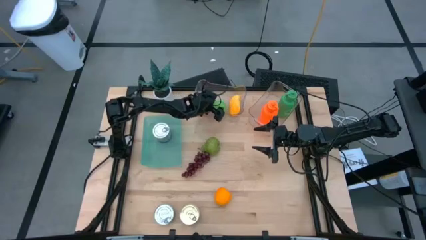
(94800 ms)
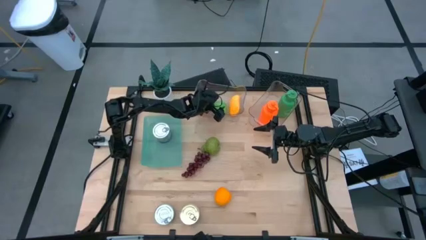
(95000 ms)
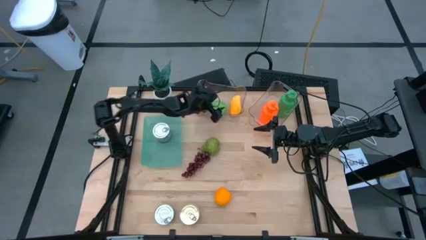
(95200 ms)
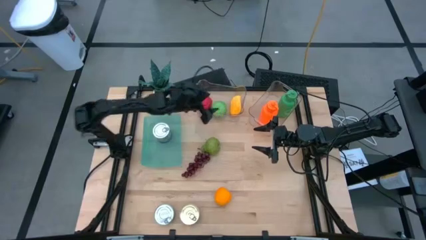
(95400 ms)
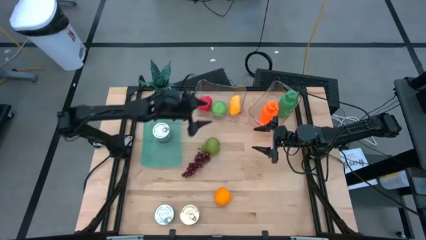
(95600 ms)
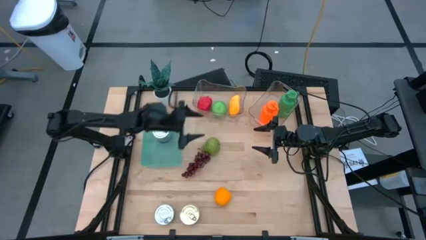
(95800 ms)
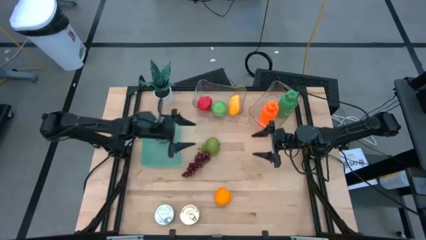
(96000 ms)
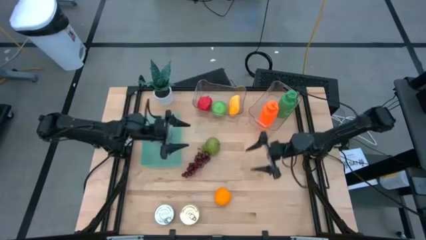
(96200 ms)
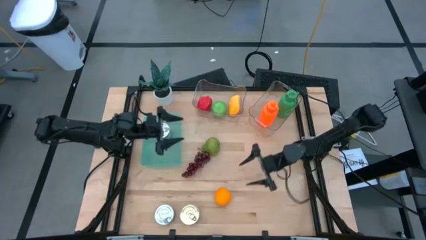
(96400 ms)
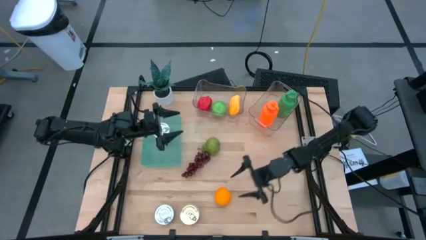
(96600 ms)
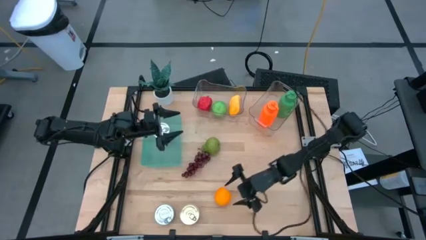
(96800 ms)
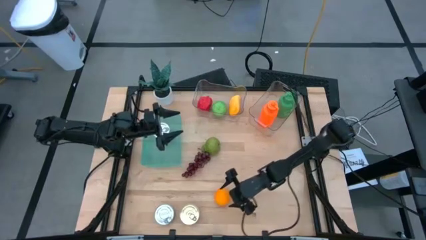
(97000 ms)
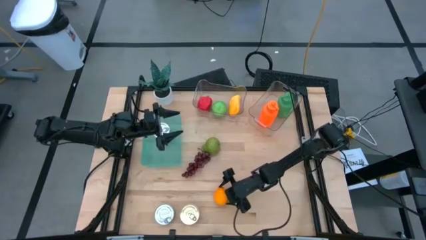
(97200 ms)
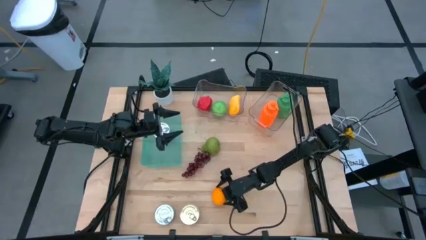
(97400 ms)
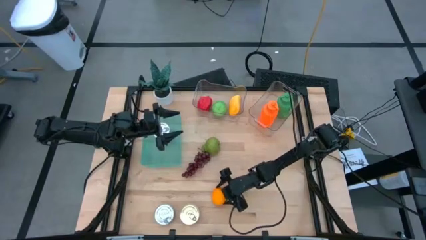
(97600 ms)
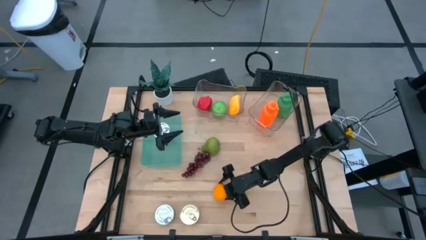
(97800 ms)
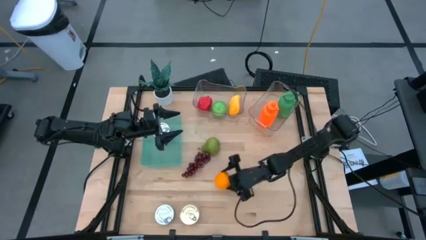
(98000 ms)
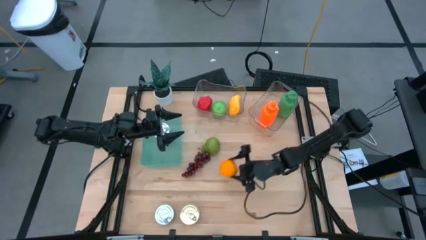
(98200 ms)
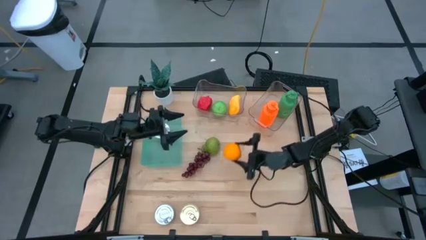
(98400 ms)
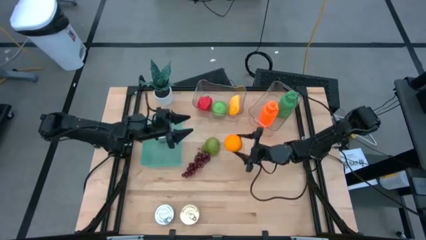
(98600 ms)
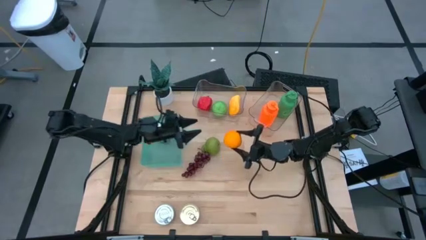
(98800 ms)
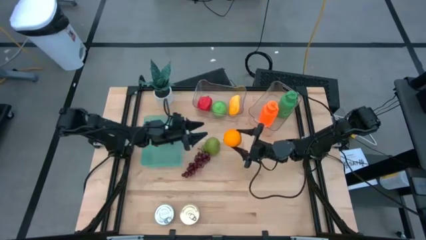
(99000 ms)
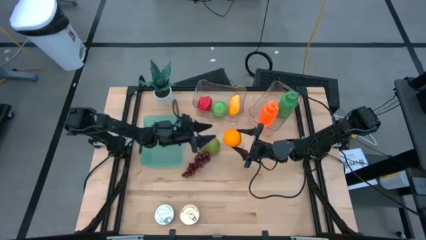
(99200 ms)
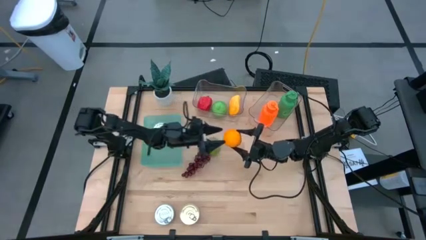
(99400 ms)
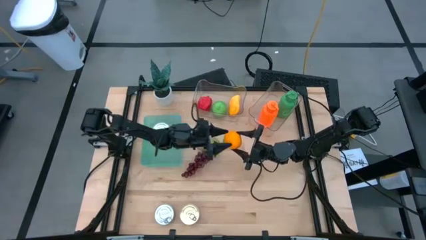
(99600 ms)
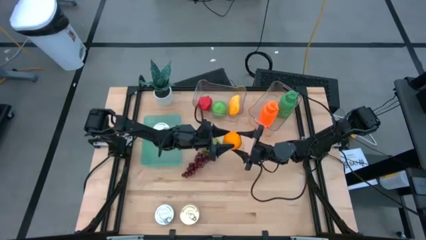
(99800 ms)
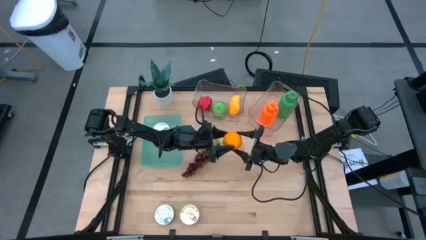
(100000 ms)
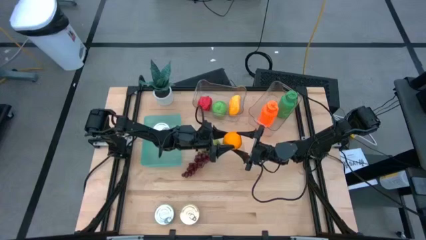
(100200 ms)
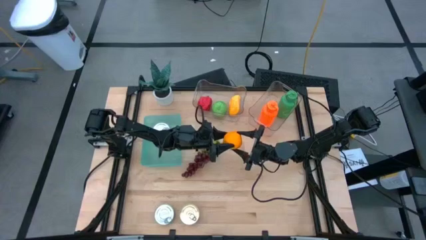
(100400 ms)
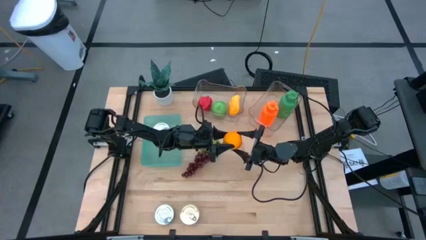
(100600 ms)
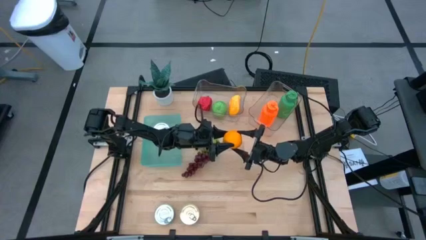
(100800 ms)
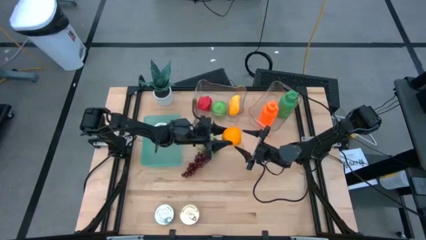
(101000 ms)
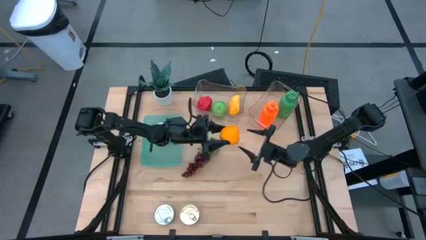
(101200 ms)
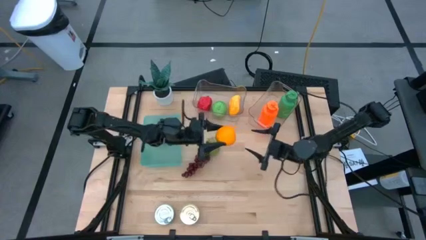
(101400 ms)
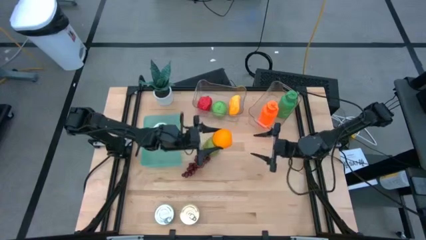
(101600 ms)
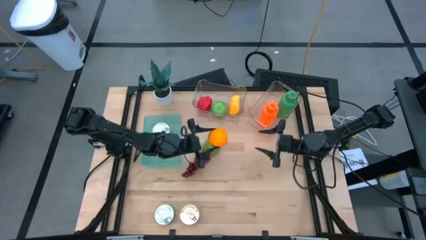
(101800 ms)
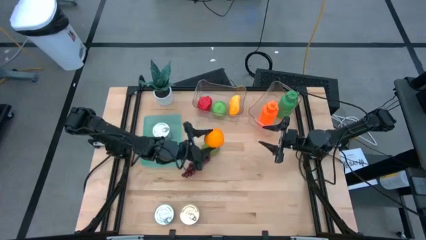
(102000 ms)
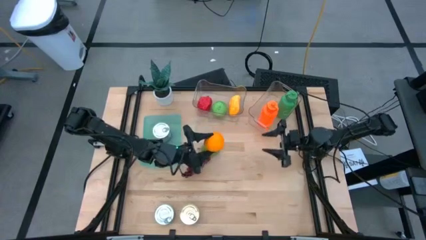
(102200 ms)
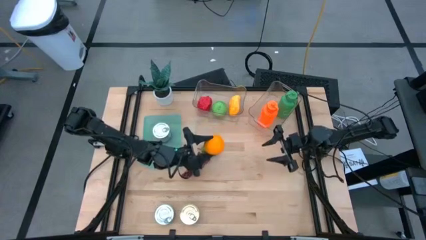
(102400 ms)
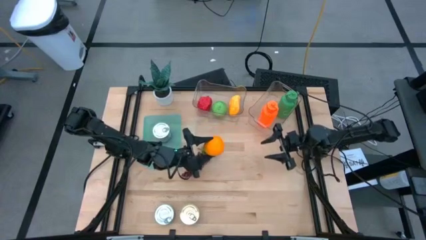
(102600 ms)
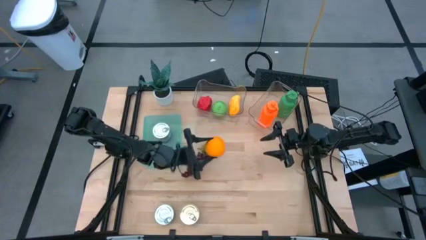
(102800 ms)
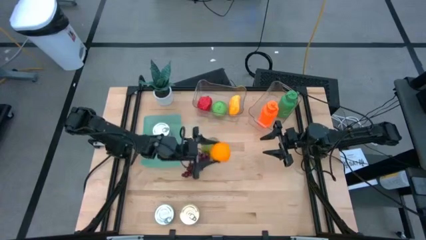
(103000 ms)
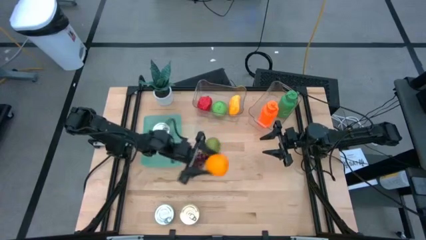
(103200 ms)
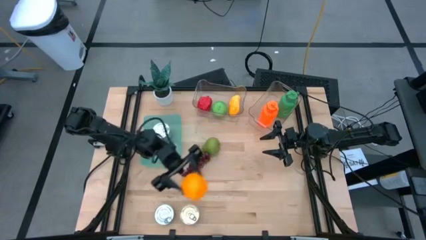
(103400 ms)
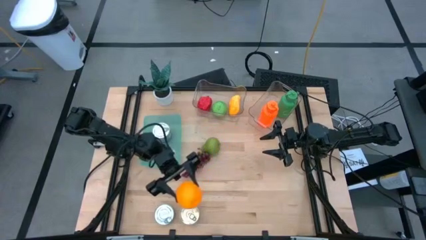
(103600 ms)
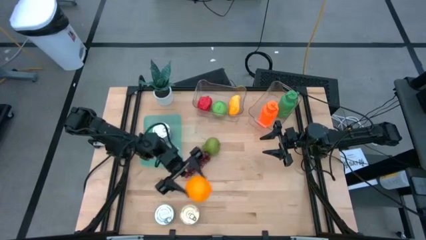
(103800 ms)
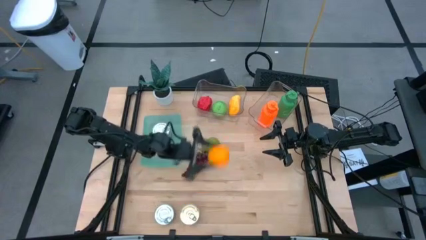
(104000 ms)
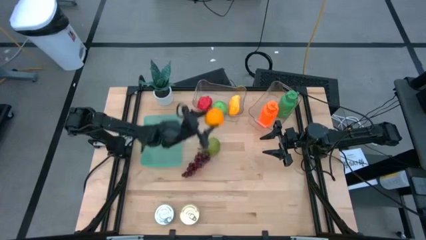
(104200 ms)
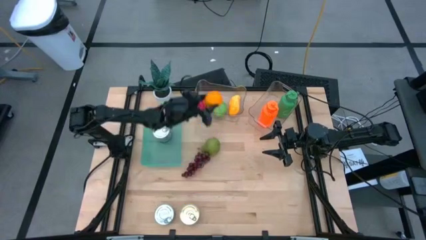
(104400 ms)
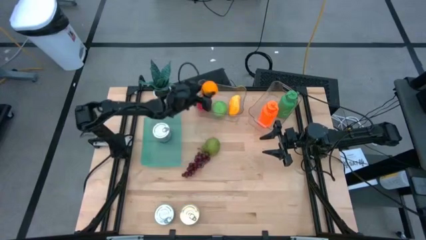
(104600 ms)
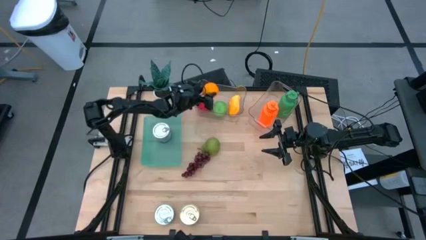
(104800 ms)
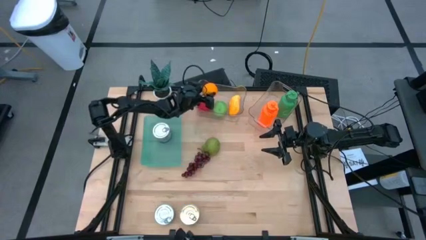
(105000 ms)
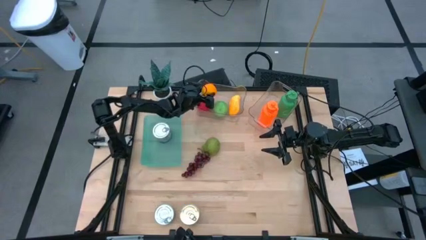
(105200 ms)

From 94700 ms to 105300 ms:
Task: Pick & Place Food Item
Put the orange into the left transparent bin

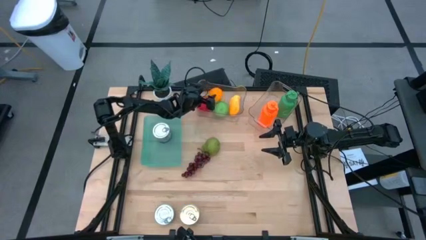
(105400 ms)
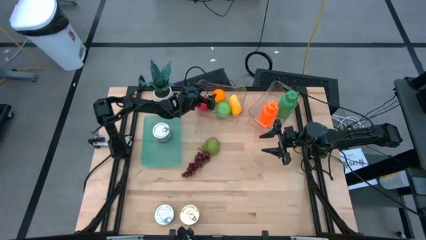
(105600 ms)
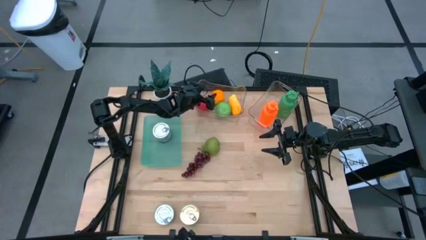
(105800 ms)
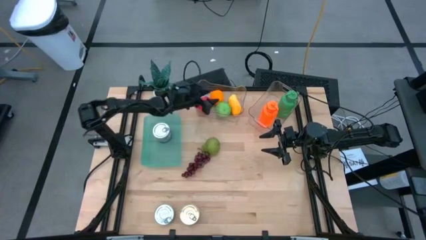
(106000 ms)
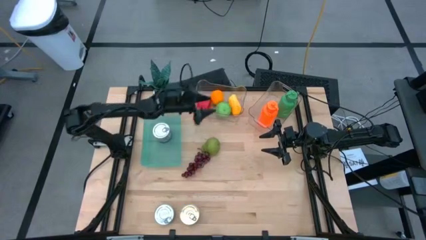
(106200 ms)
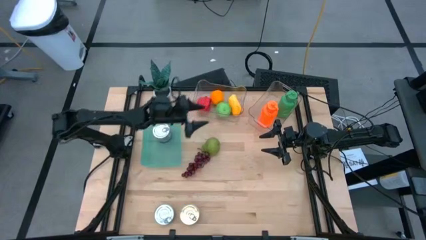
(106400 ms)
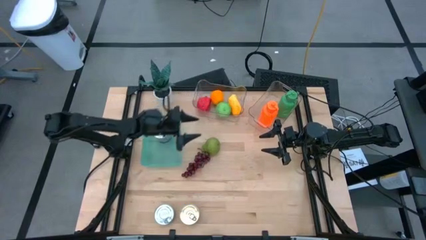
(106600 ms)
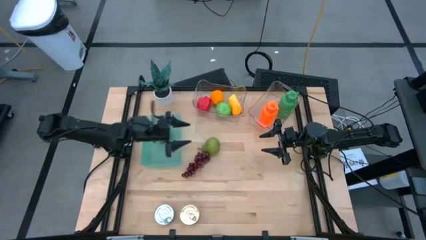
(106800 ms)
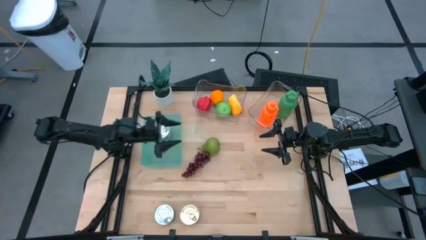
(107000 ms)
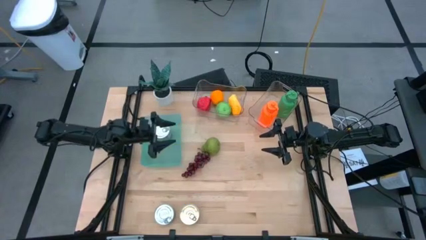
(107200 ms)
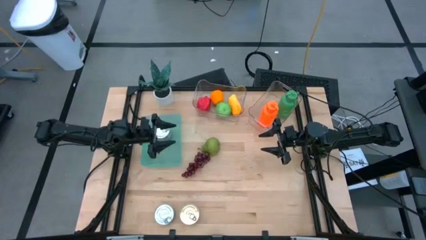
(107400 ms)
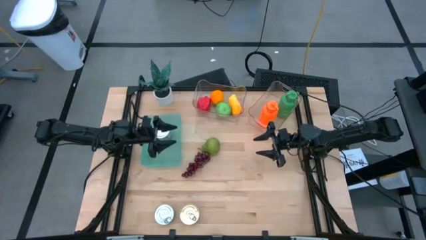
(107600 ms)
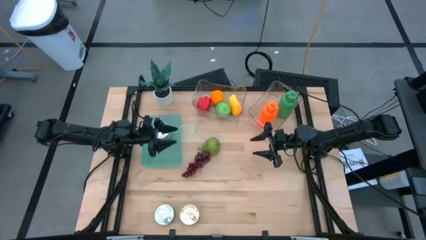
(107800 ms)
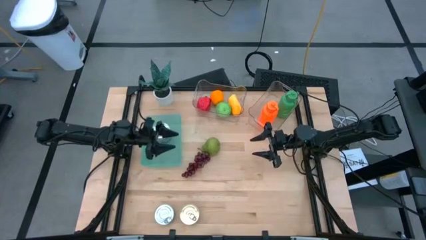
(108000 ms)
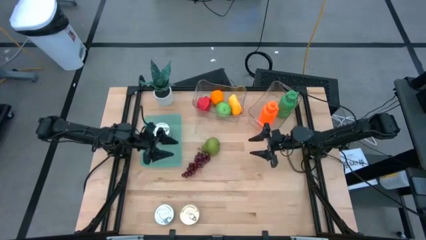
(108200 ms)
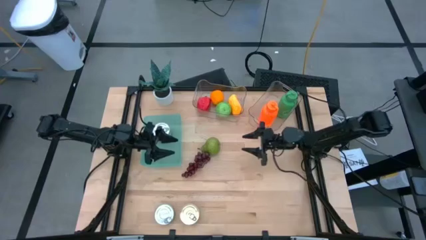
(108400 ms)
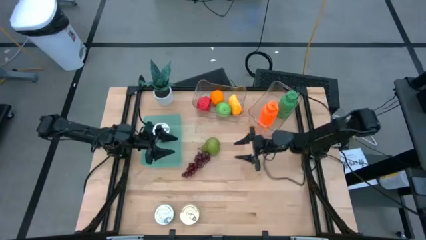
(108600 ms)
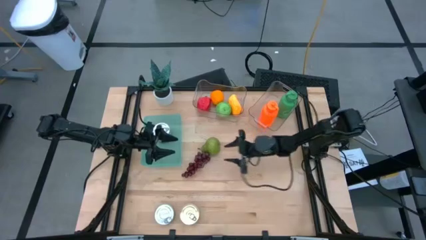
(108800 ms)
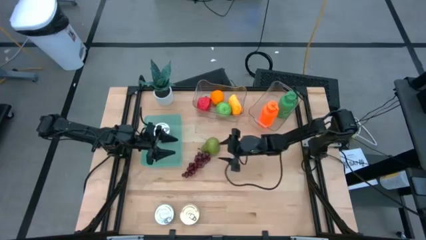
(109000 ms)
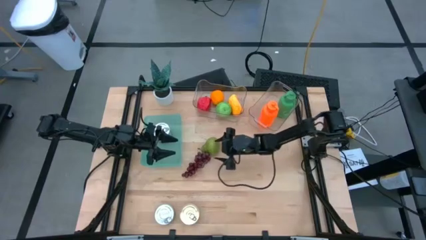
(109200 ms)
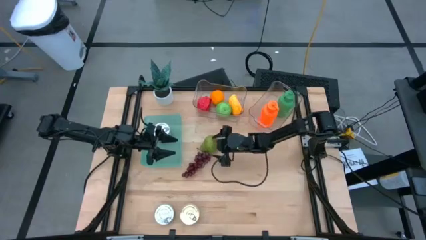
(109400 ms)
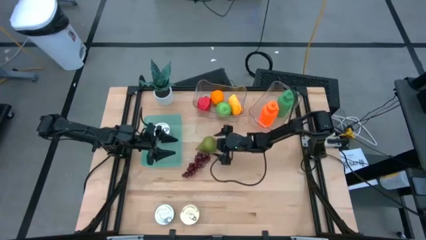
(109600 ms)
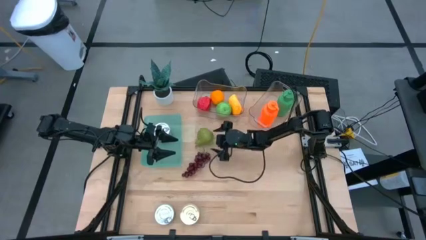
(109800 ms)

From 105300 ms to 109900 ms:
Put the green pear into the left transparent bin

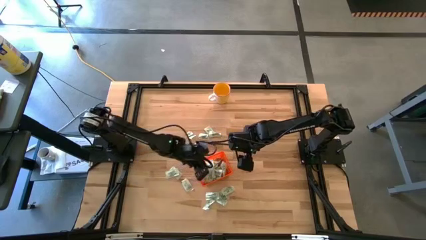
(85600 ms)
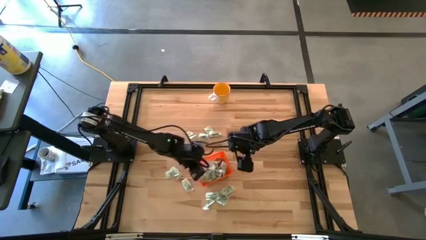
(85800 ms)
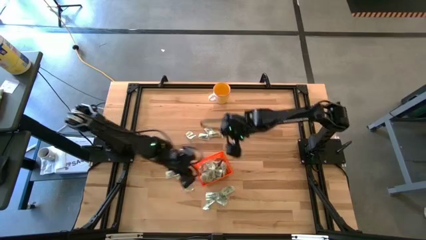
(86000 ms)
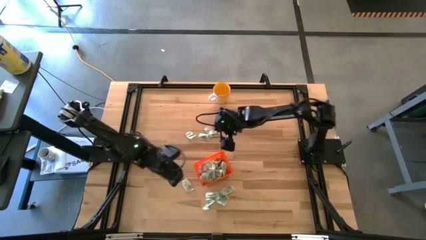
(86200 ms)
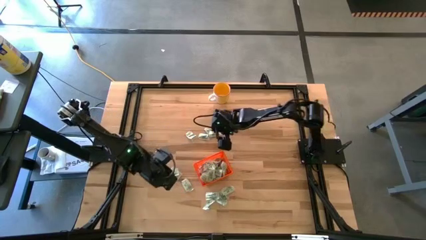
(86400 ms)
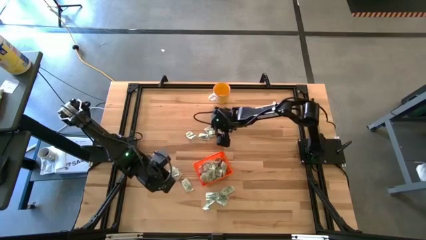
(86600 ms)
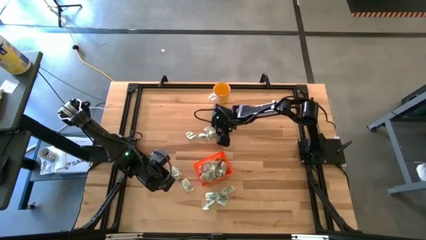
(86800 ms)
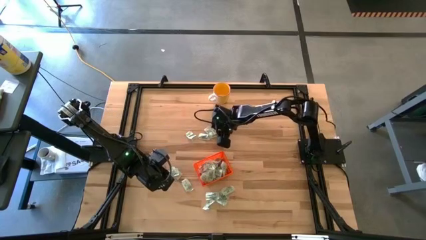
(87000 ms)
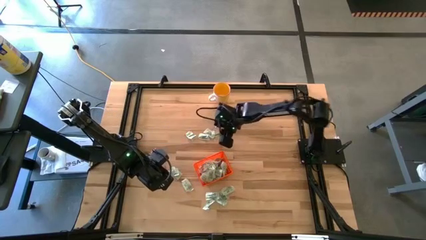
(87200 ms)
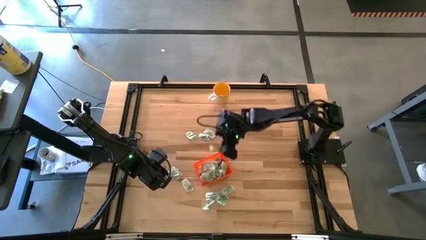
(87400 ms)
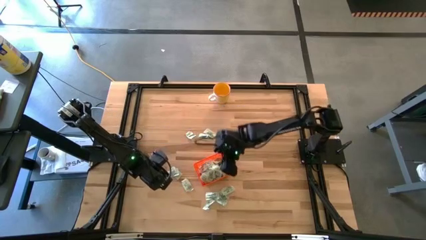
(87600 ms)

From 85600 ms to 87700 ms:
Task: Pick and place Stevia / Truvia into bins
Put the stevia packet into the bin
